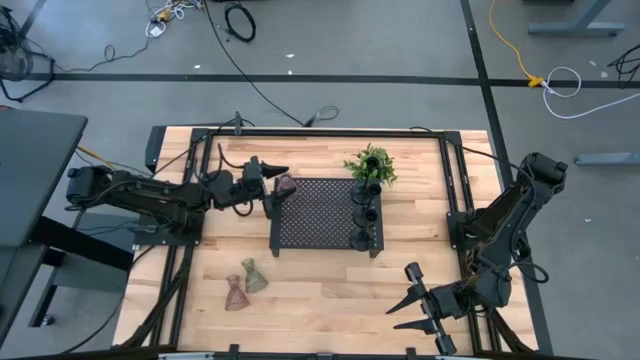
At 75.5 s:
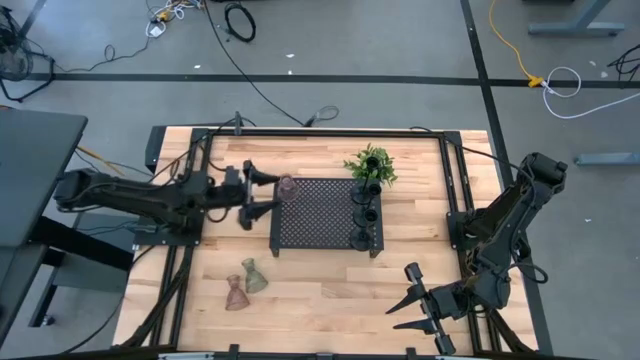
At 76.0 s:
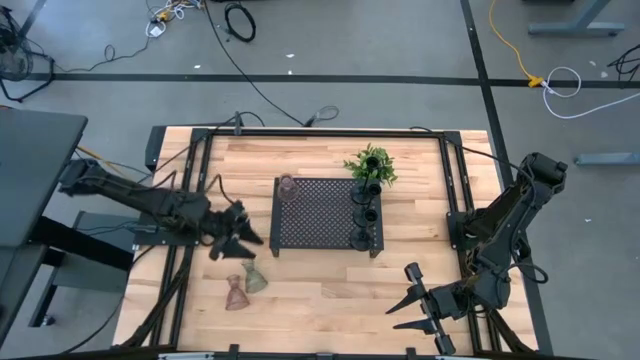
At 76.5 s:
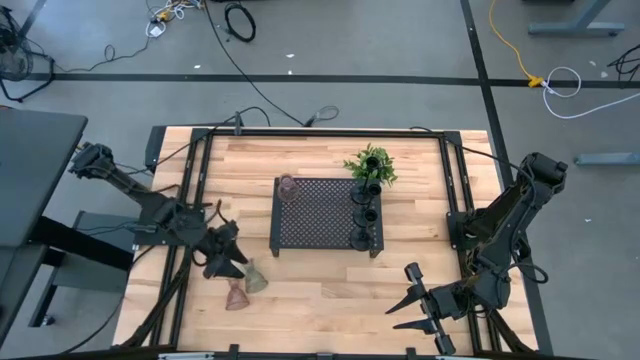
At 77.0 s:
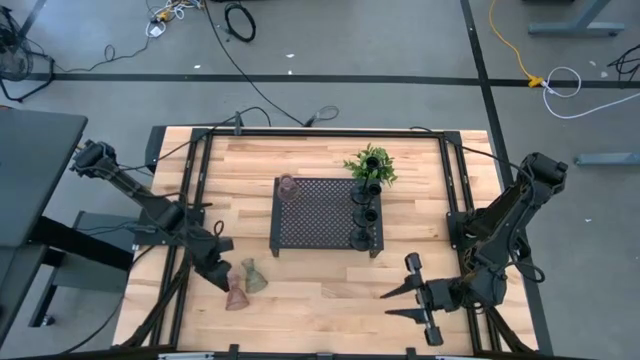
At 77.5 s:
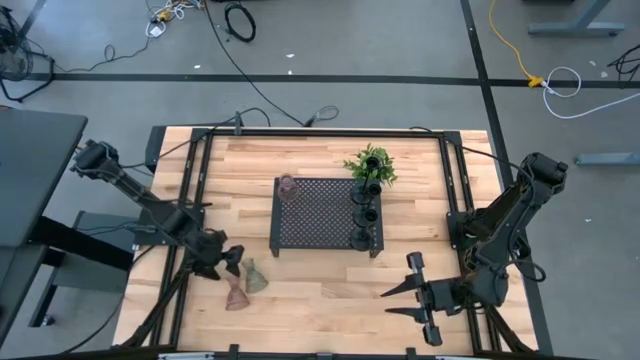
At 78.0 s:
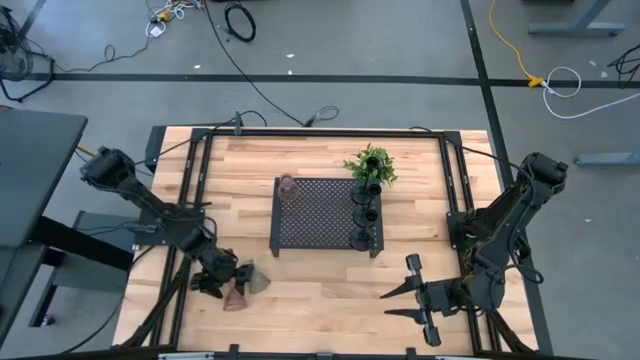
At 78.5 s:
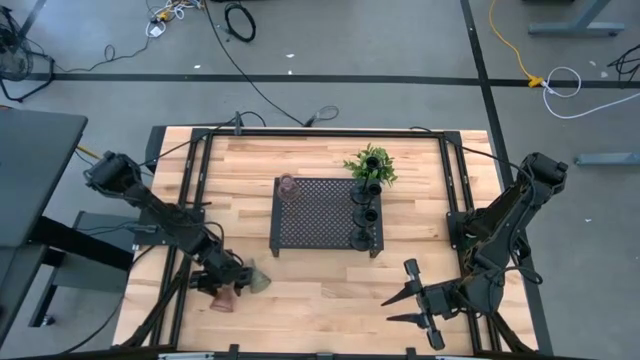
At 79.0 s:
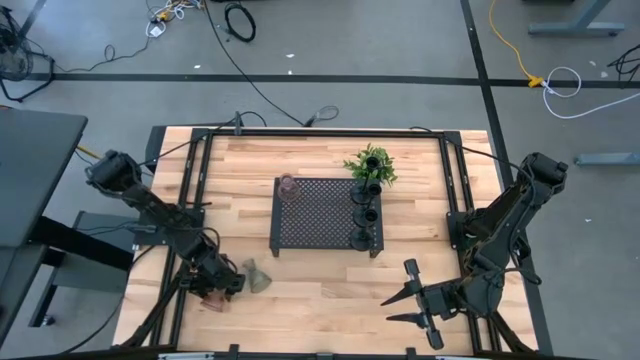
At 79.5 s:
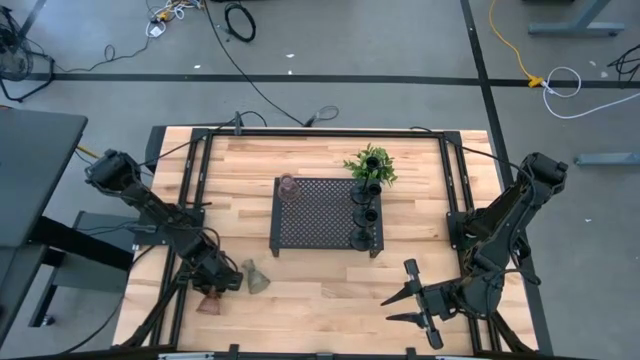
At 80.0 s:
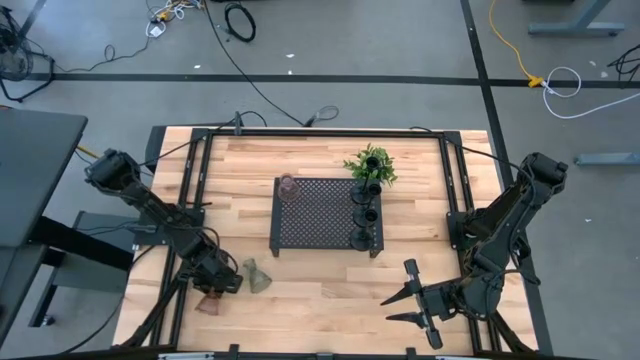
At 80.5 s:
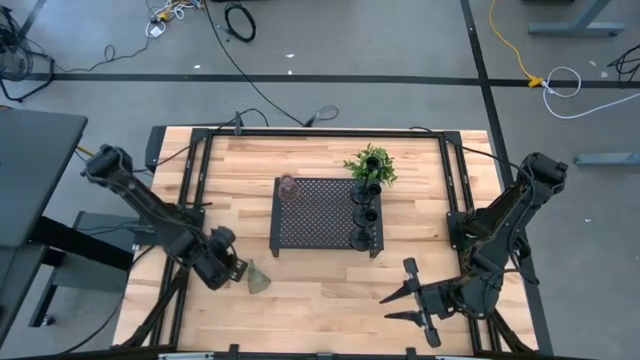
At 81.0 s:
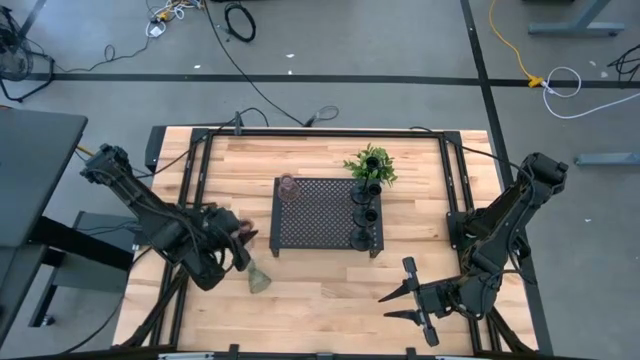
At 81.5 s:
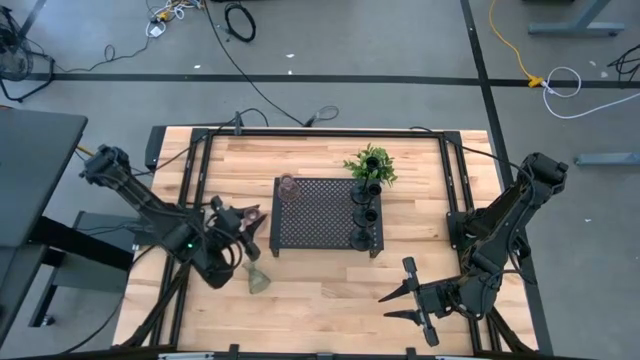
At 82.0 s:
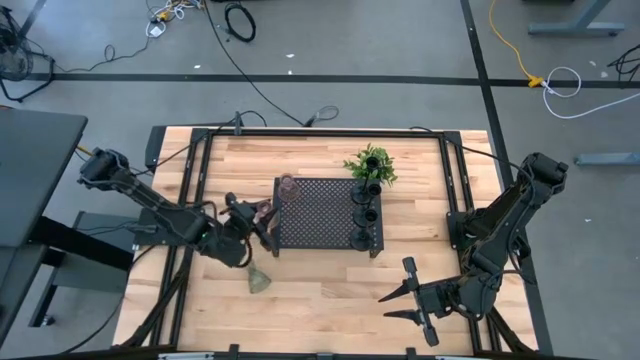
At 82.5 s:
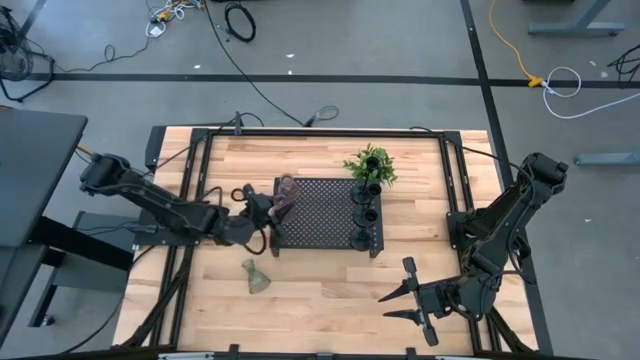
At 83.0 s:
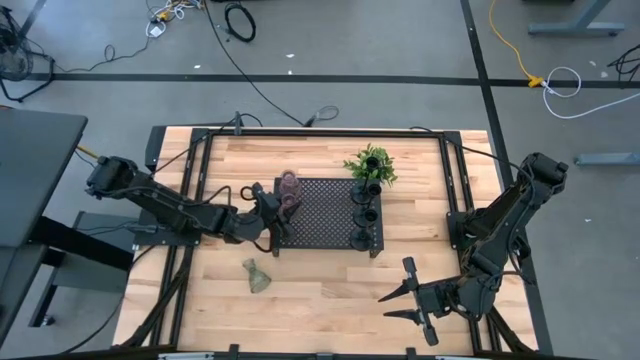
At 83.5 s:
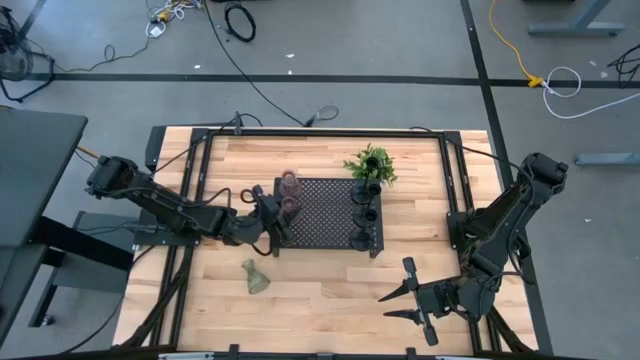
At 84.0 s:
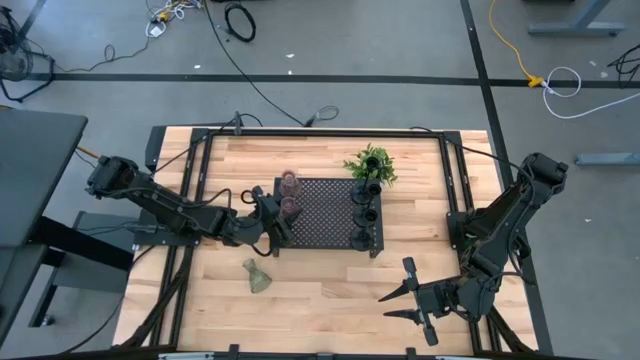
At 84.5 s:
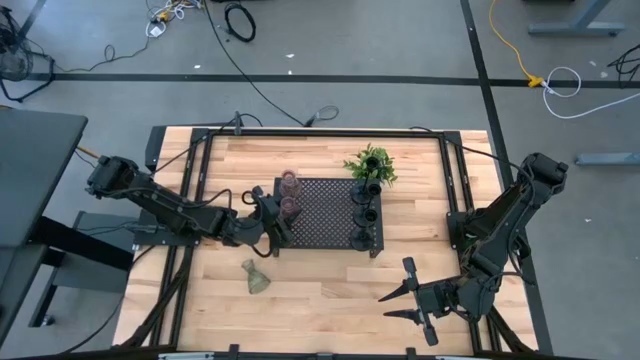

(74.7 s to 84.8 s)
Task: Pick & Place candle stick holders
Put the pink glass candle stick holder on the shelf

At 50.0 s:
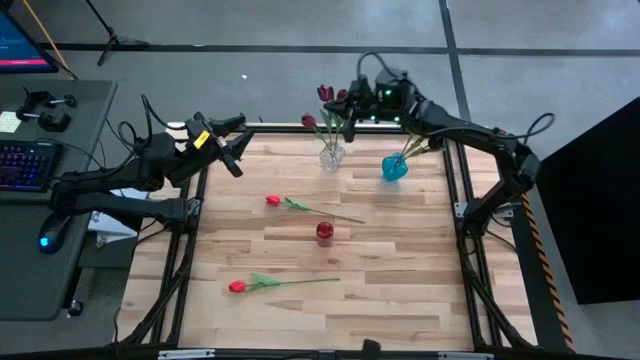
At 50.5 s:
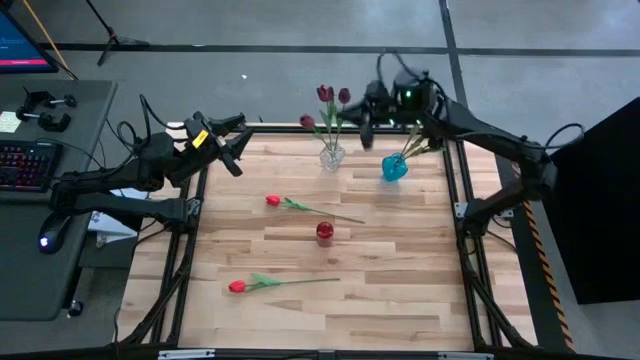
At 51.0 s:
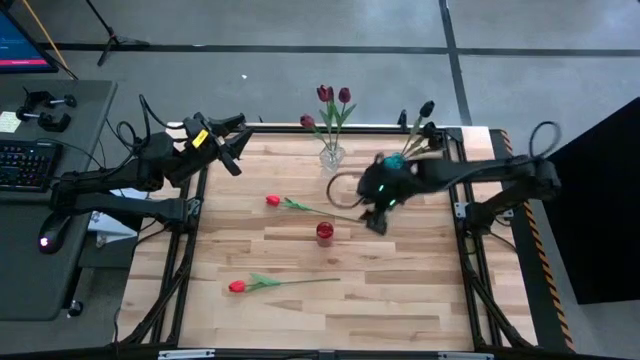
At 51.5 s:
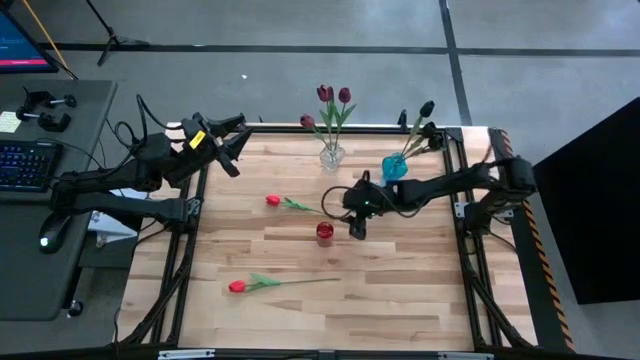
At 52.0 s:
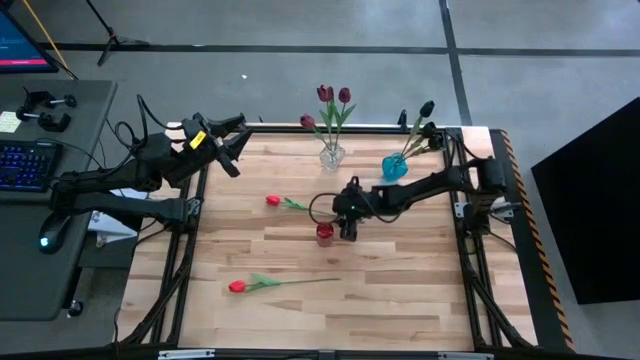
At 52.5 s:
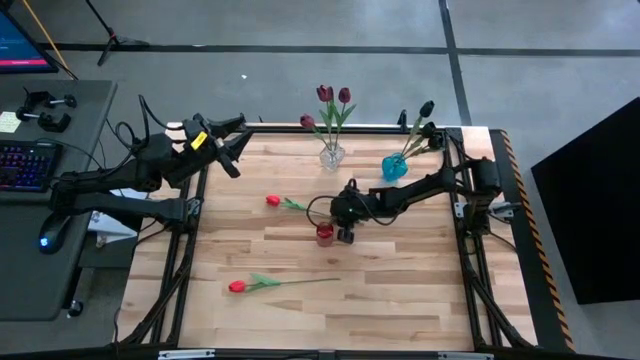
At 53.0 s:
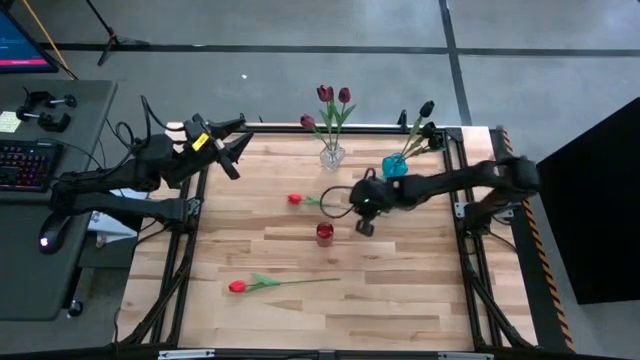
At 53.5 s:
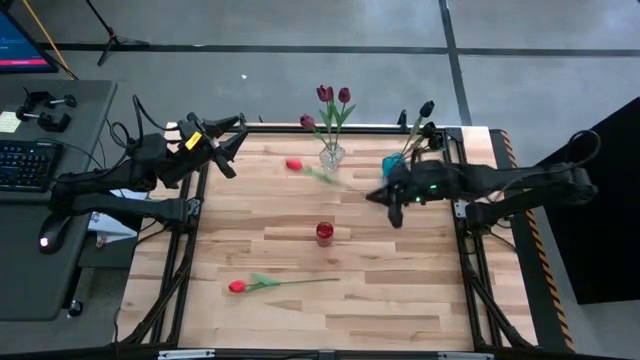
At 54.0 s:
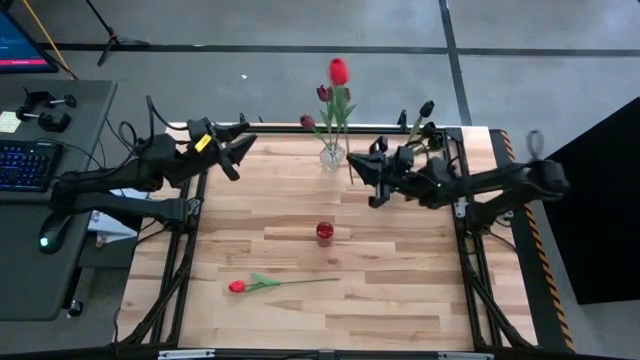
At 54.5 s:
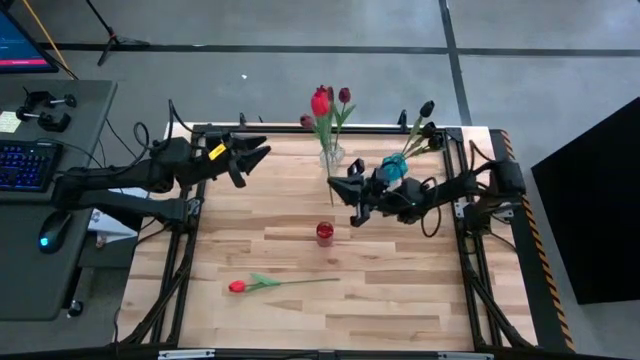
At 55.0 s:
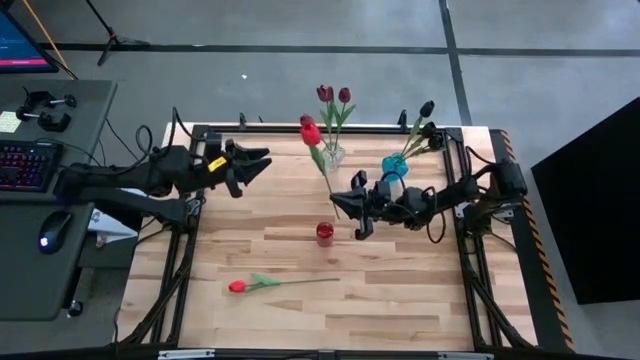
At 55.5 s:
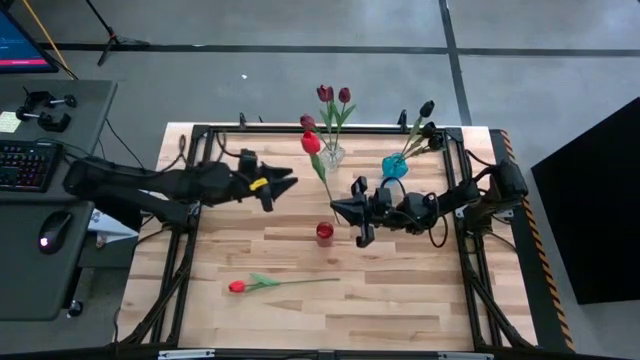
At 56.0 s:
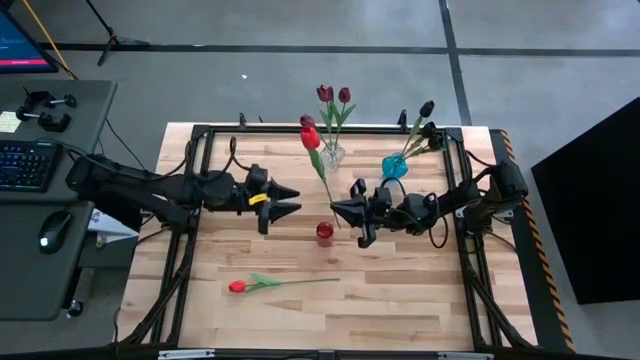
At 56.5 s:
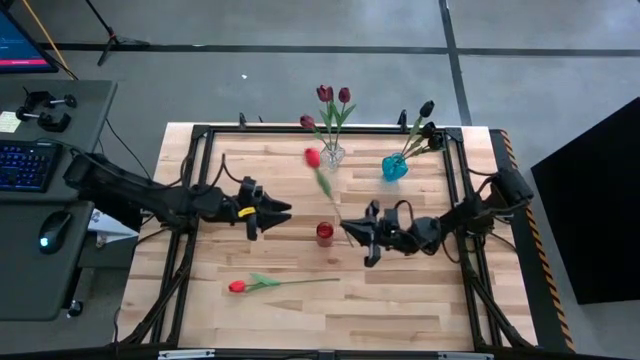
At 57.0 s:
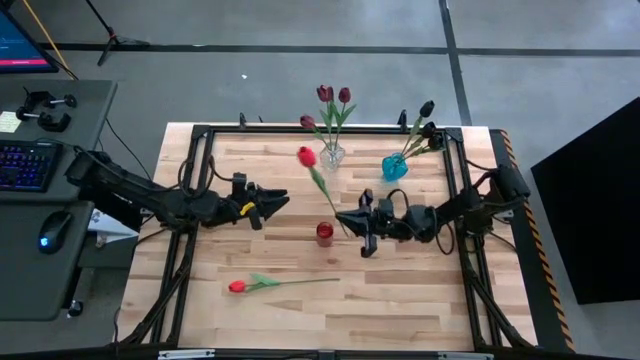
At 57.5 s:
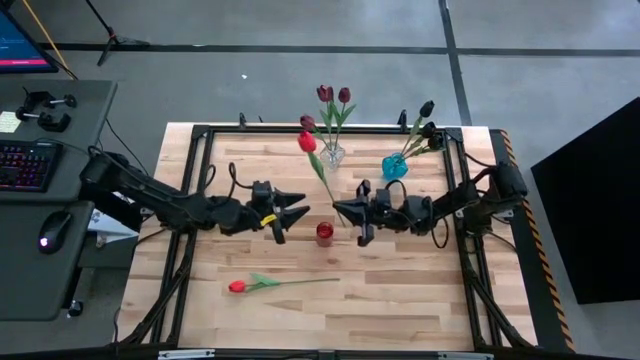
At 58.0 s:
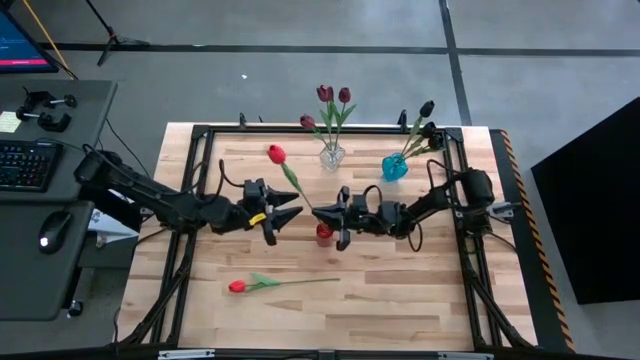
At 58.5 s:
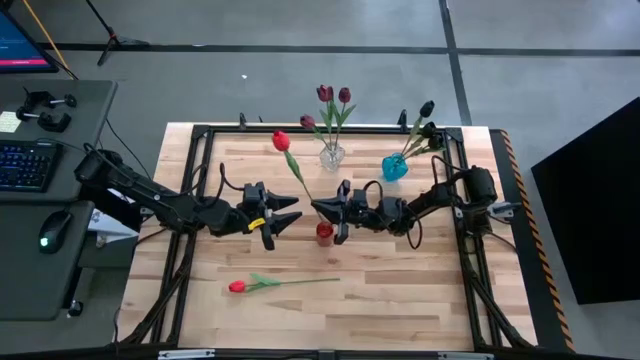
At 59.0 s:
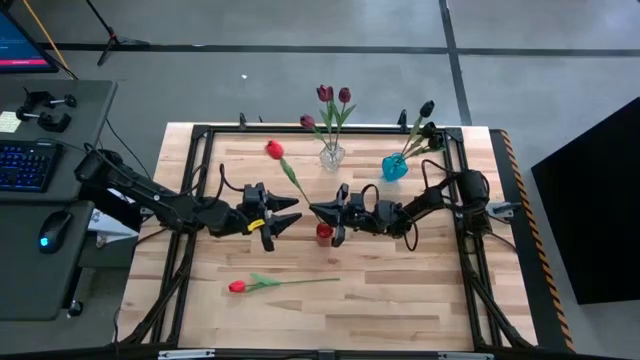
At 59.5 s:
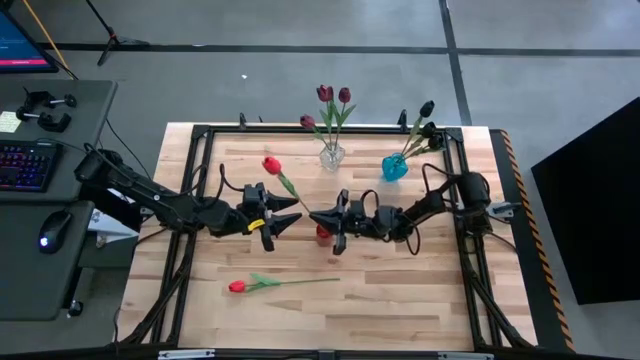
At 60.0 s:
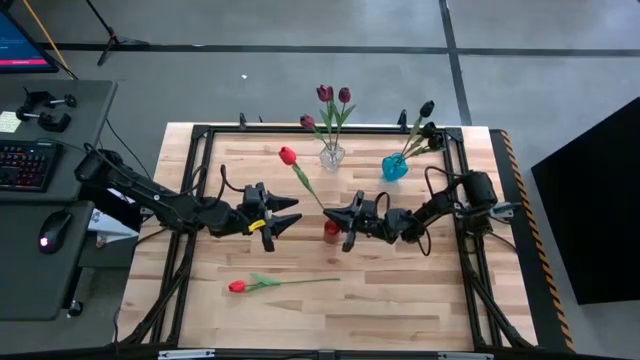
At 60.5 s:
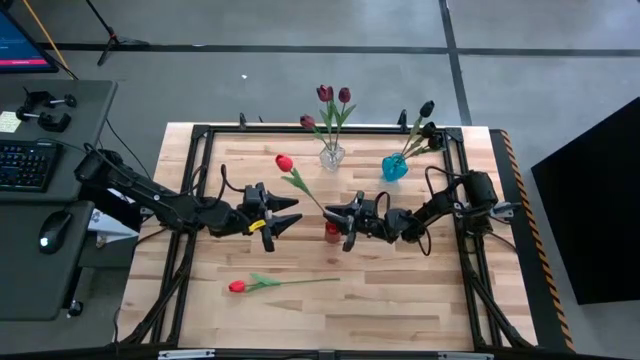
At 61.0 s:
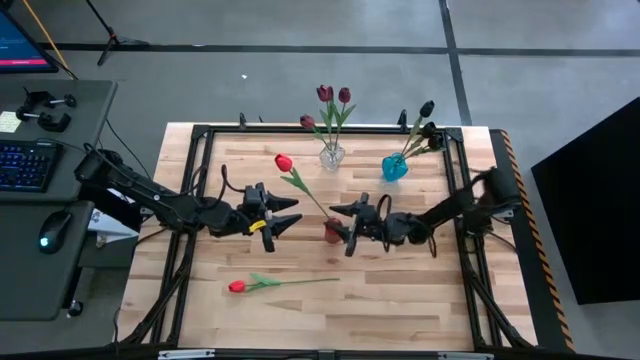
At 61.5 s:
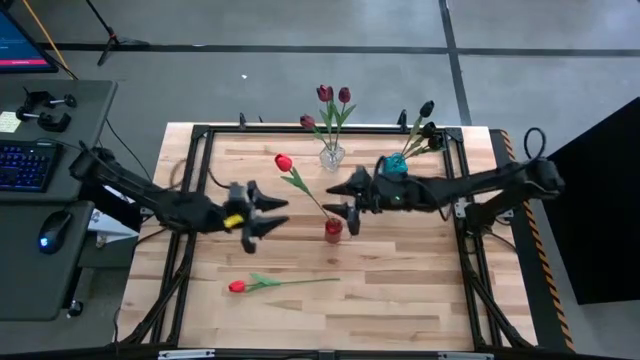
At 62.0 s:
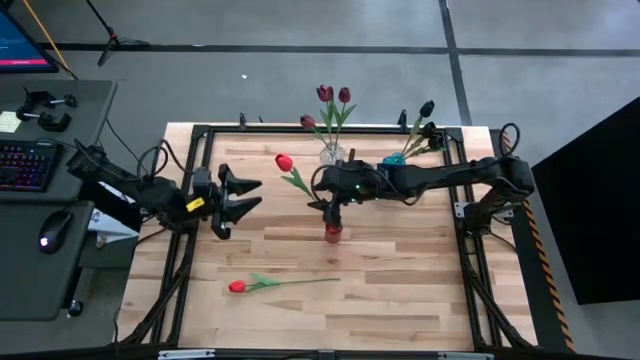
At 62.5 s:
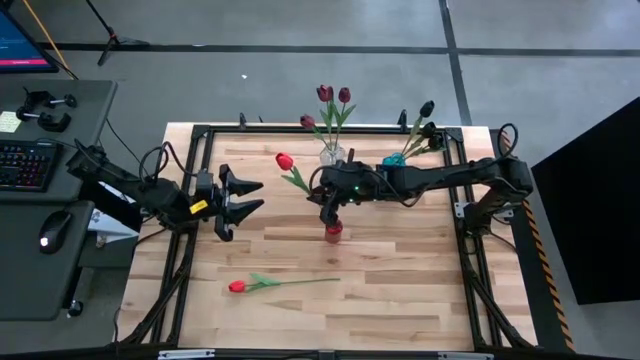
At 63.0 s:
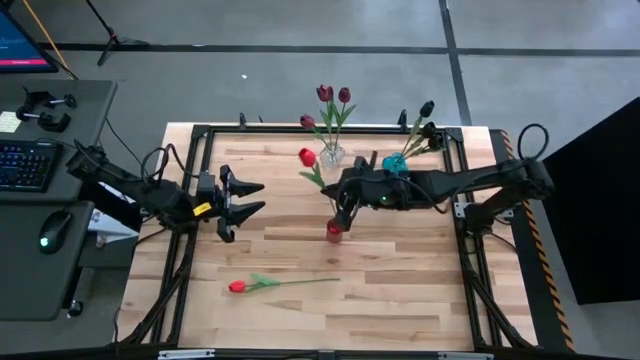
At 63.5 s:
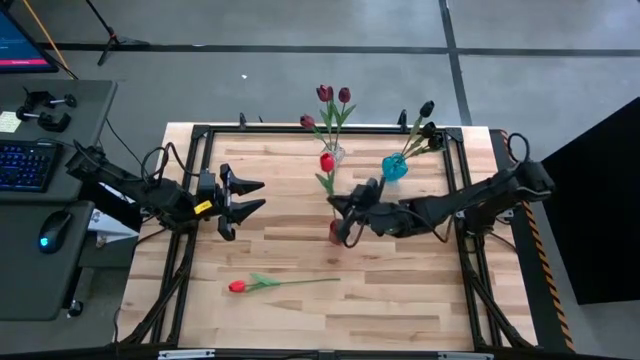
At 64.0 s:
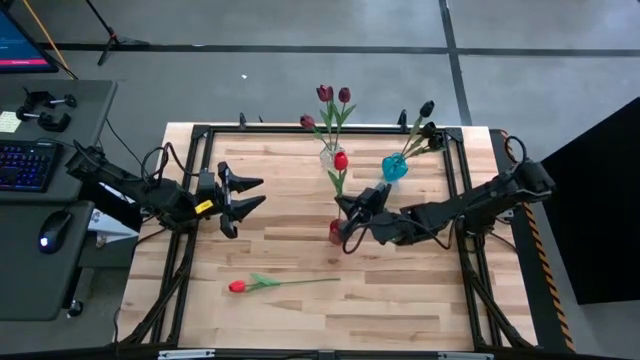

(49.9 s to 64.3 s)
Task: Sort flowers into vase by color
Put the top red flower into the red vase
